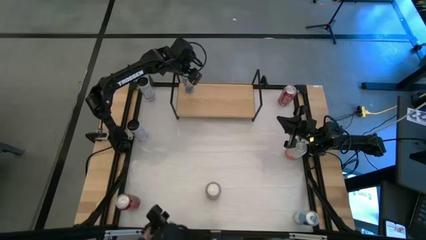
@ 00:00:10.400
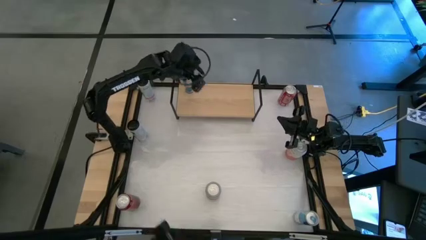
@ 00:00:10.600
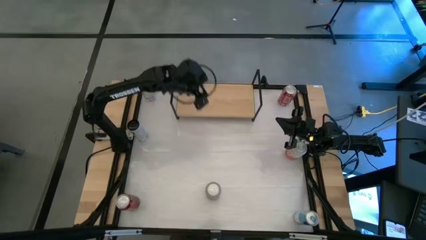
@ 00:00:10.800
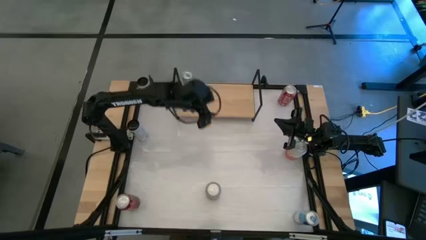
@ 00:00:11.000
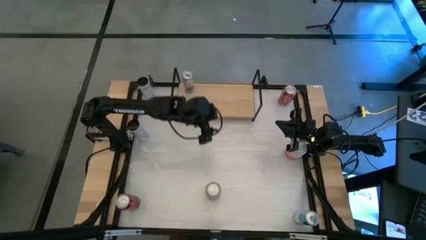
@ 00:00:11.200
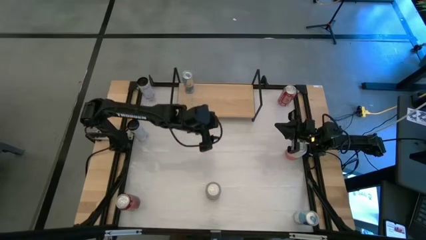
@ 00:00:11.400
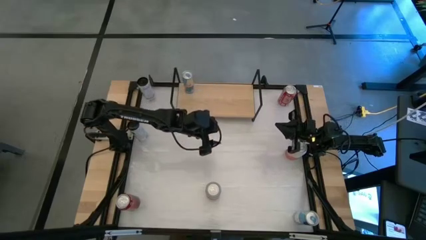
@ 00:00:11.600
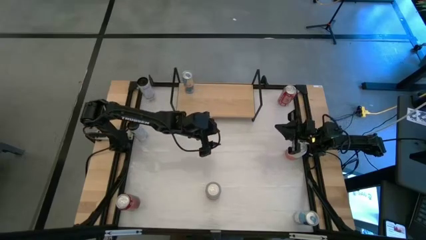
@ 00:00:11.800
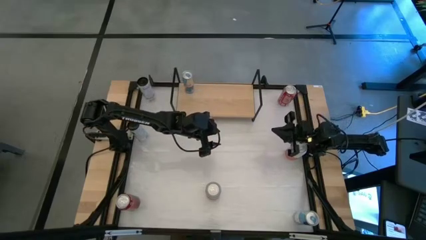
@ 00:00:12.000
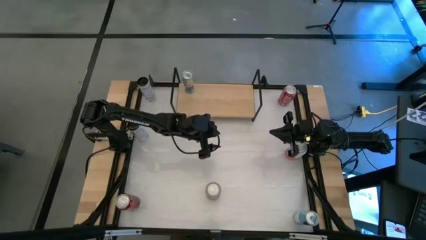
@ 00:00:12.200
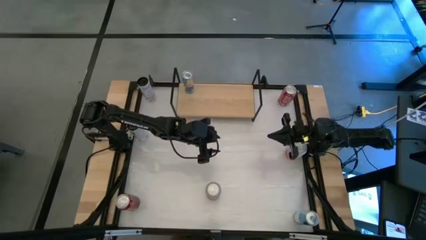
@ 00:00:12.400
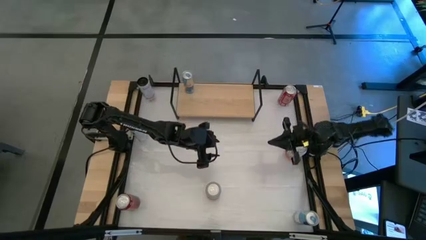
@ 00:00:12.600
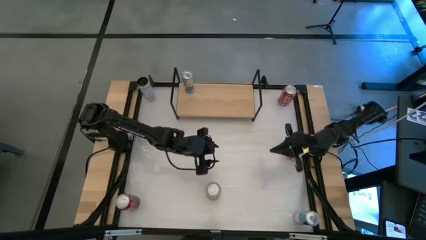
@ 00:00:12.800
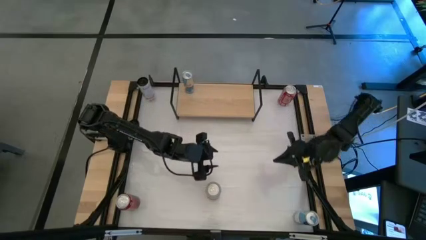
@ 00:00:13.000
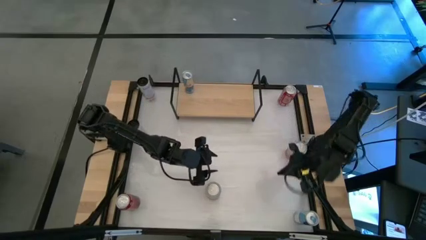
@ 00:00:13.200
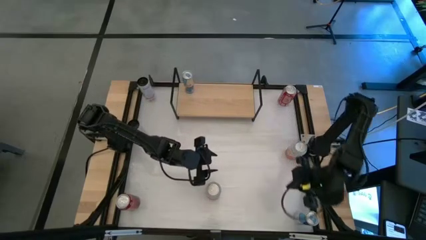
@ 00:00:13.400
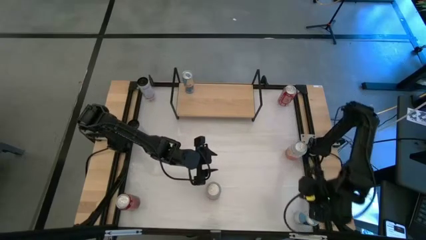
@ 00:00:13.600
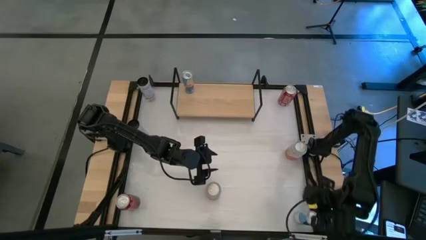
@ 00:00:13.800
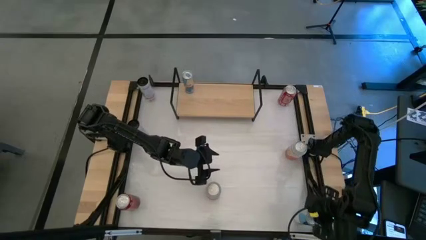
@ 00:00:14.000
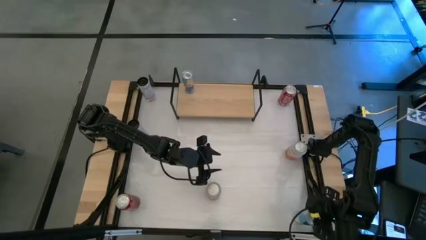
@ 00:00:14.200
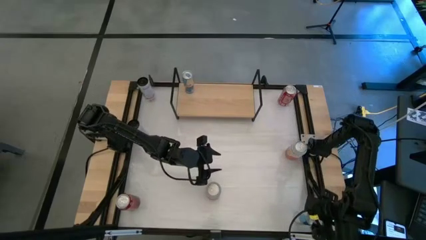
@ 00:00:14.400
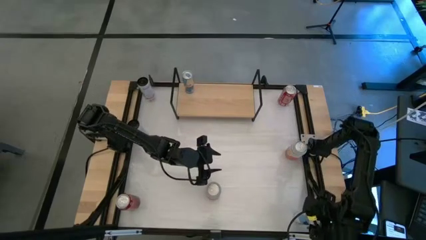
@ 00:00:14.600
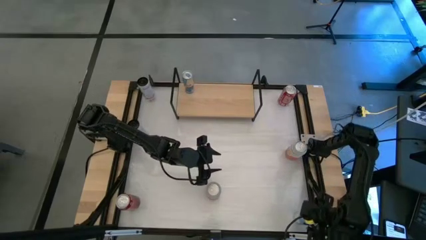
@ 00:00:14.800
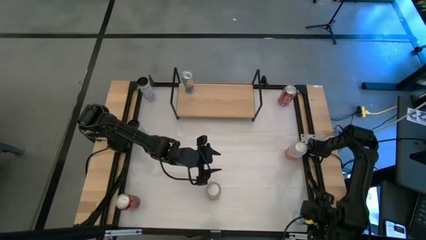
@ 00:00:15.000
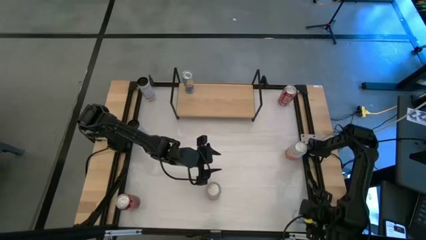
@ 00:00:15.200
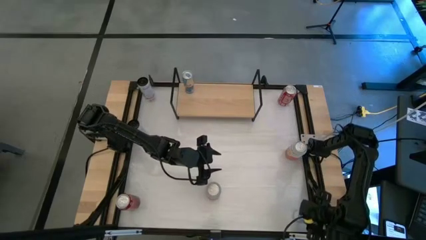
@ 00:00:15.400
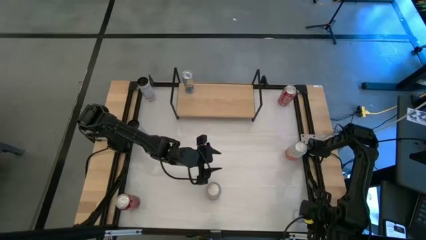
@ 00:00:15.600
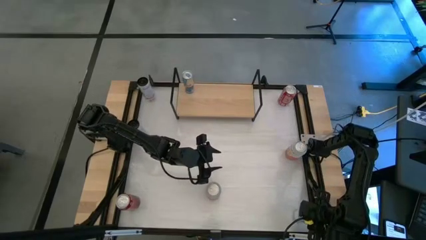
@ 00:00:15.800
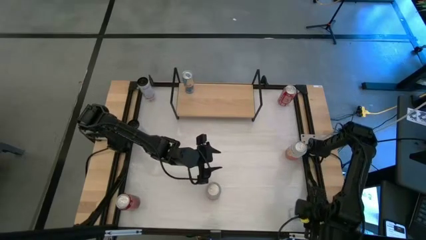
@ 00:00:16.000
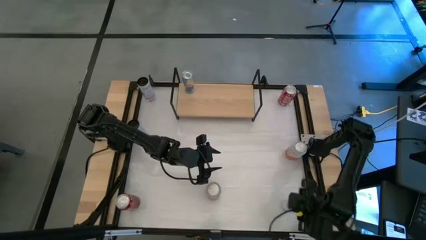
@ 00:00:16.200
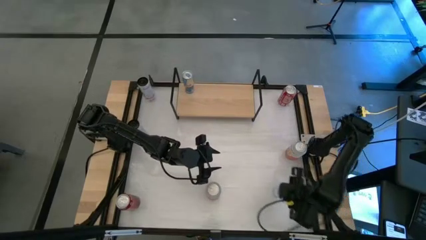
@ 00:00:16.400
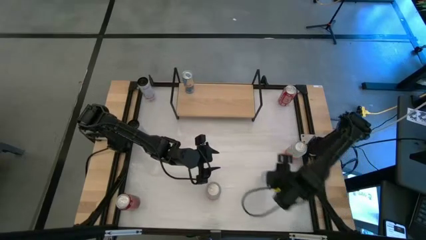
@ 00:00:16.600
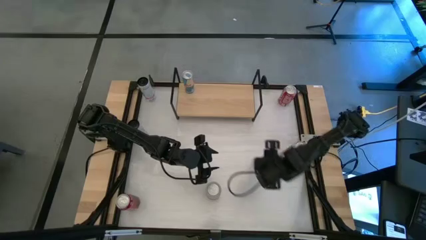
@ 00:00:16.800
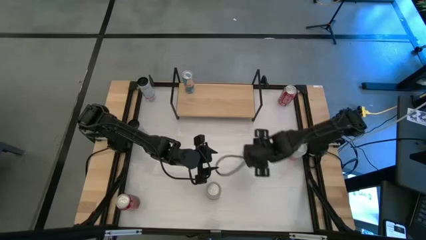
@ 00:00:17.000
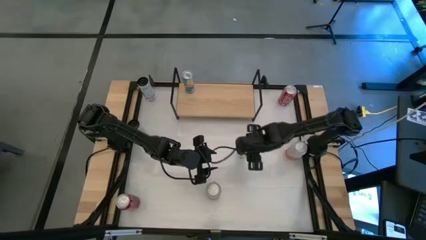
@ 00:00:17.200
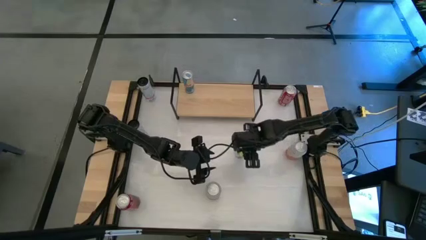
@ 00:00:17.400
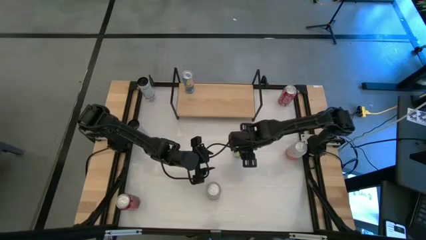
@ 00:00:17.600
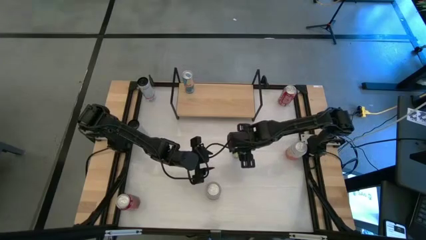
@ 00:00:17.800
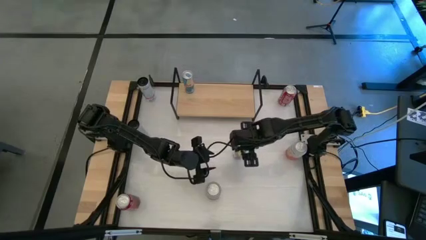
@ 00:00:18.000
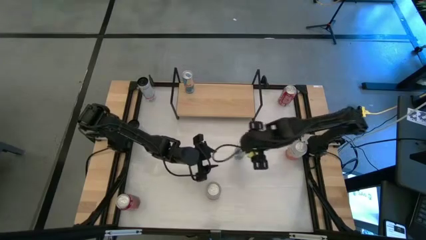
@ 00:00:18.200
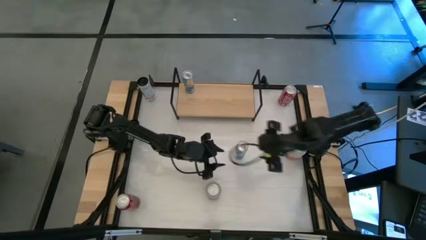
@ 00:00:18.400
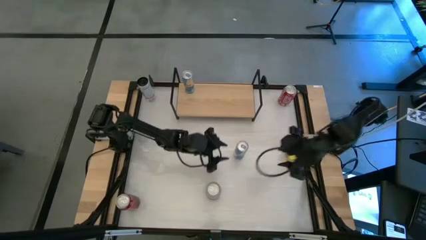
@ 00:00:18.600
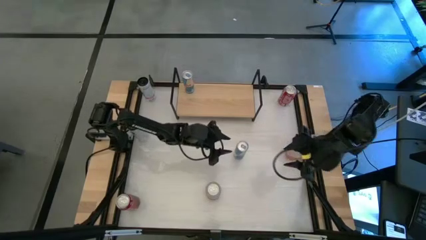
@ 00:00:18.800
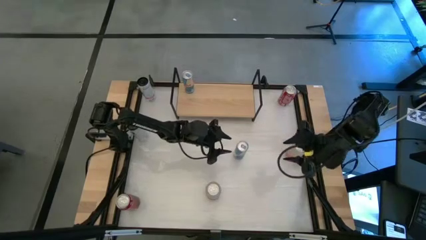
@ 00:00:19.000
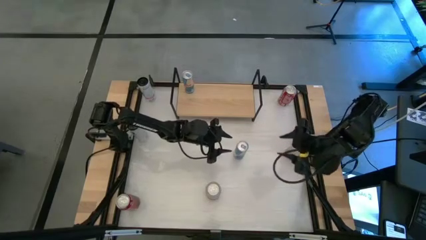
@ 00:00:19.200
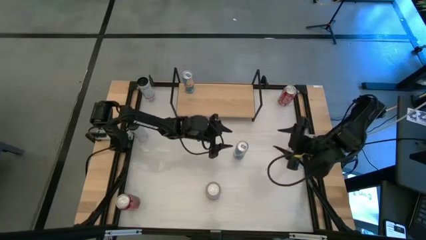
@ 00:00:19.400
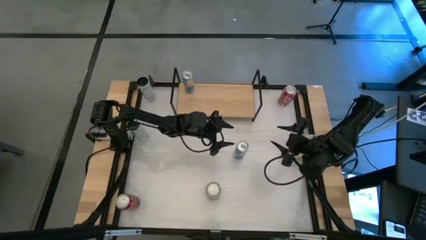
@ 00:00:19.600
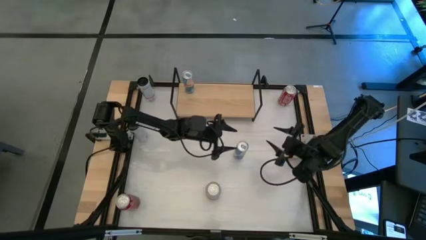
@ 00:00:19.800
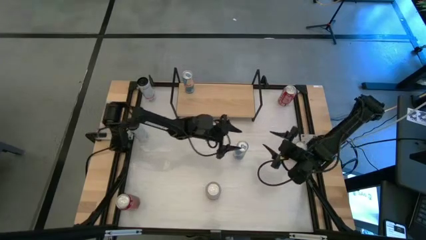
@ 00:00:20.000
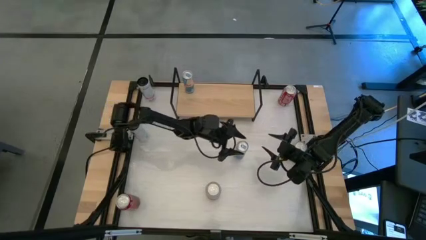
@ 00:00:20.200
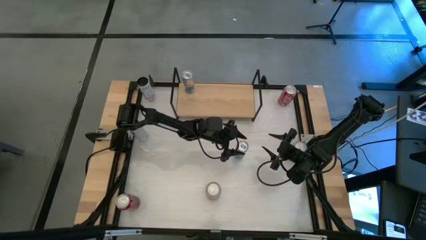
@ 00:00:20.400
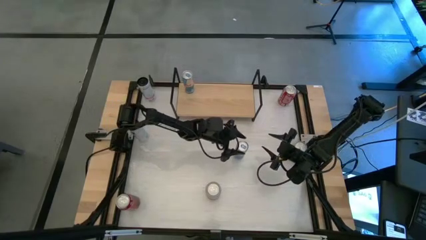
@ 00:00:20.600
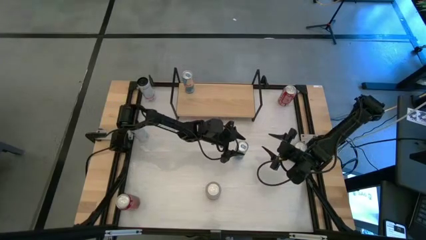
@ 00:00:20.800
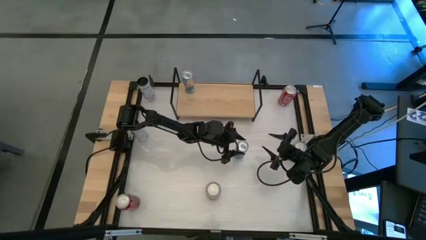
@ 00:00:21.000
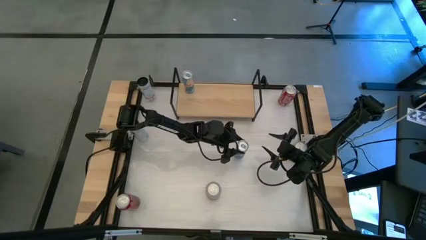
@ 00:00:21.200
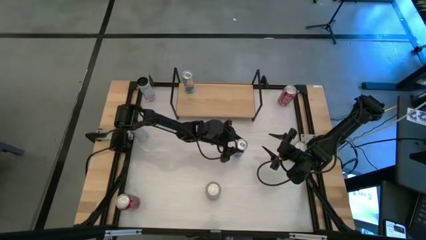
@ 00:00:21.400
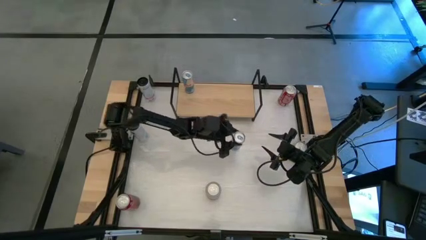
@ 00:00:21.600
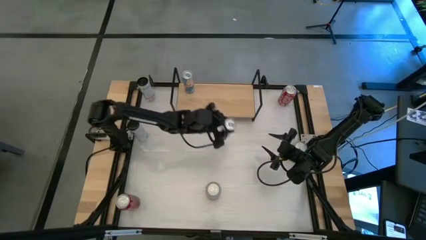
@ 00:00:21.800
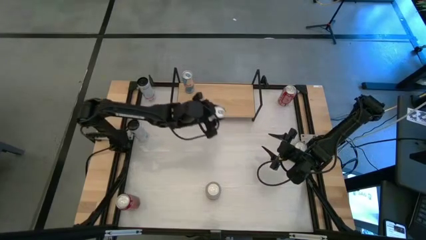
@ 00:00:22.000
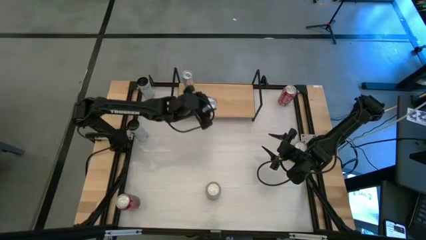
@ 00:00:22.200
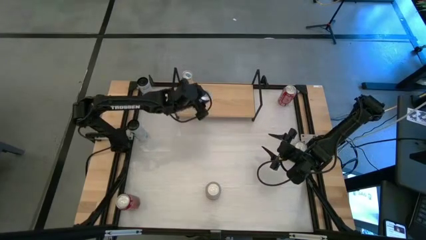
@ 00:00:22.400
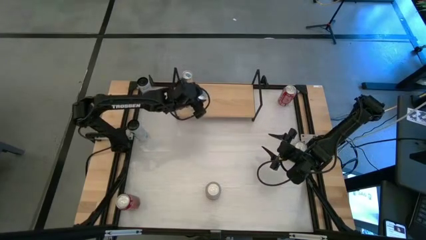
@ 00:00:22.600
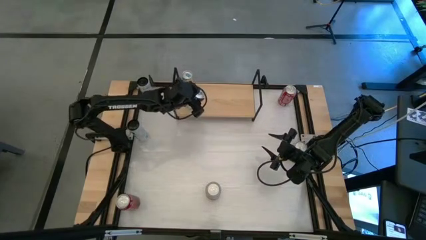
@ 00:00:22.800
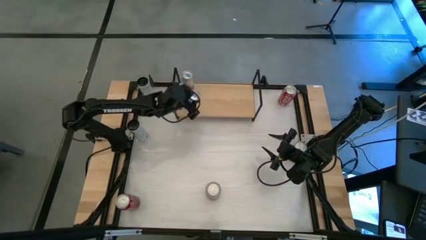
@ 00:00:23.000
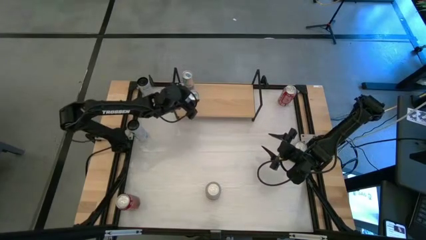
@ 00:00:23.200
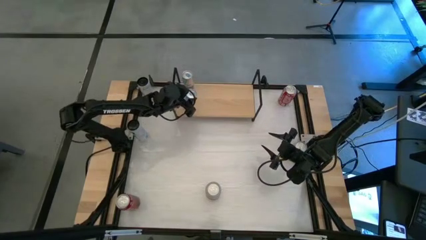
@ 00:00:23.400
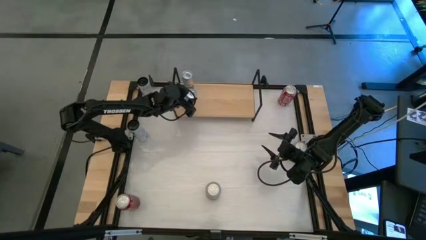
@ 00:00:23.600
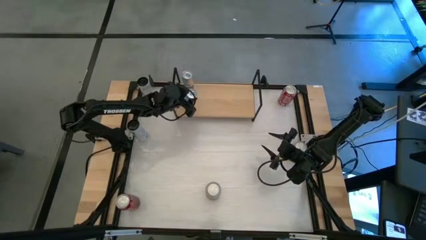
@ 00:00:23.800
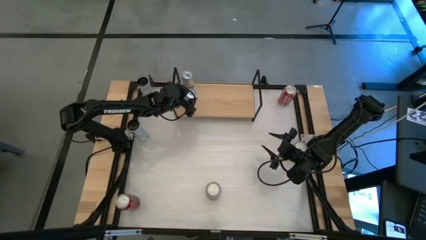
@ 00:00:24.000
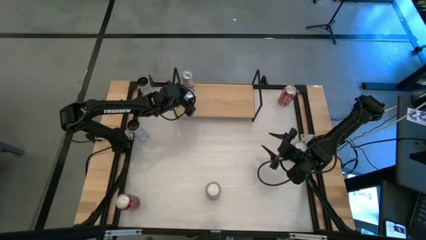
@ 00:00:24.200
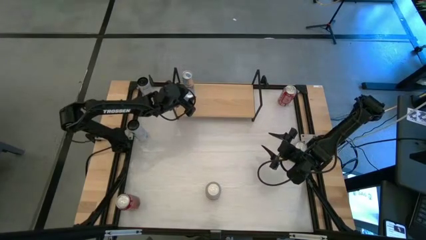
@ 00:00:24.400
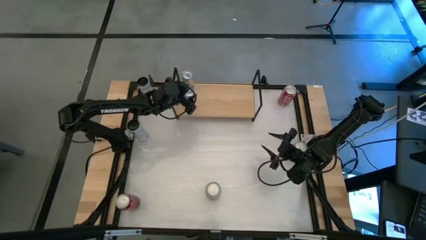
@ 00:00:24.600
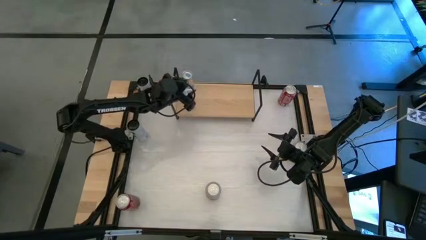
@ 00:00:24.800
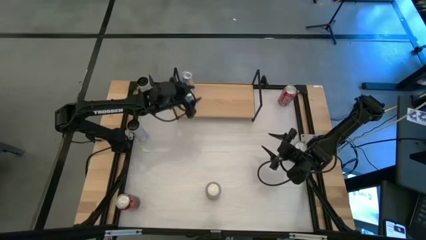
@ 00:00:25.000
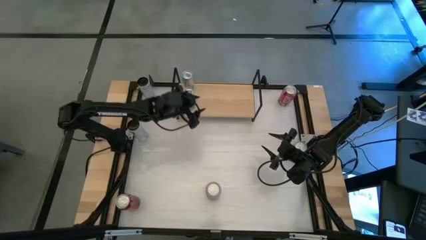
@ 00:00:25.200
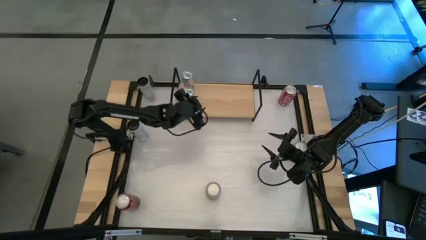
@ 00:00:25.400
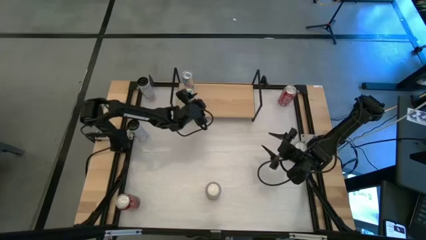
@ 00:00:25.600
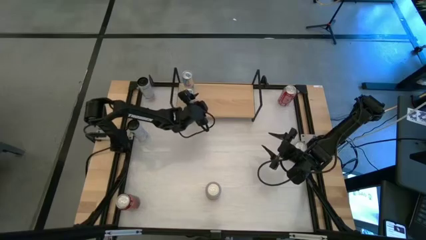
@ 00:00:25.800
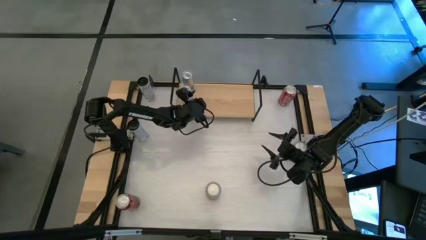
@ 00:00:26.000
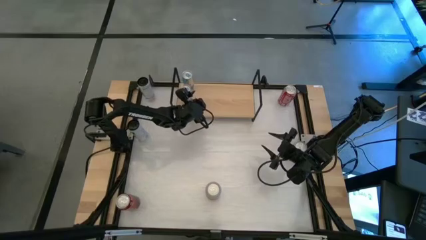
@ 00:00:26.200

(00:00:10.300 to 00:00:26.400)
Task: Place canned beverage on shelf
Put the blue soda can aligned with the other blue soda can on the shelf
